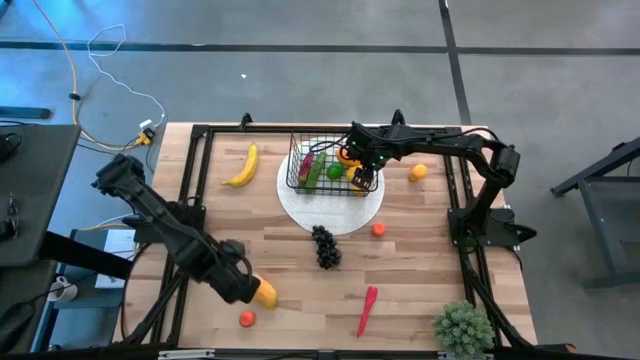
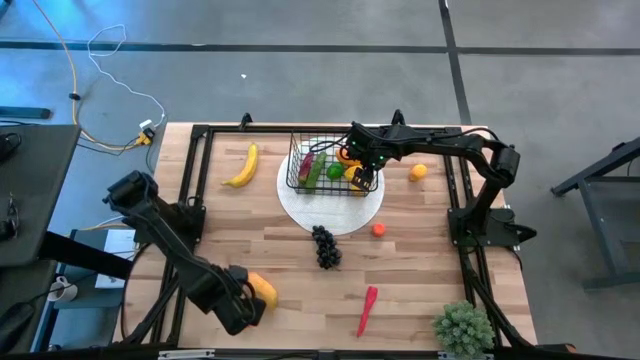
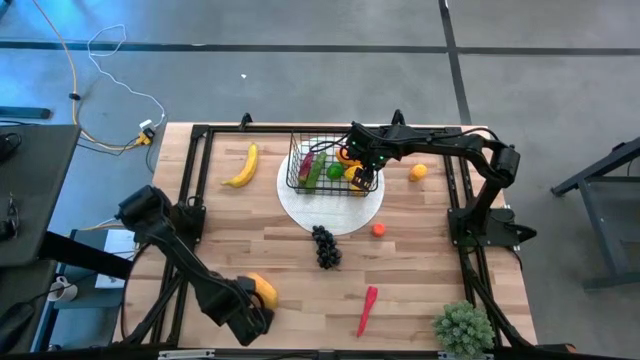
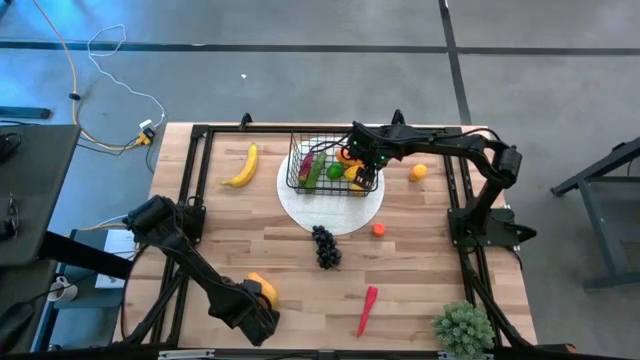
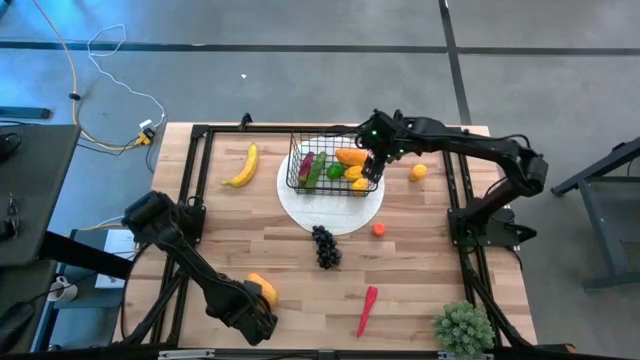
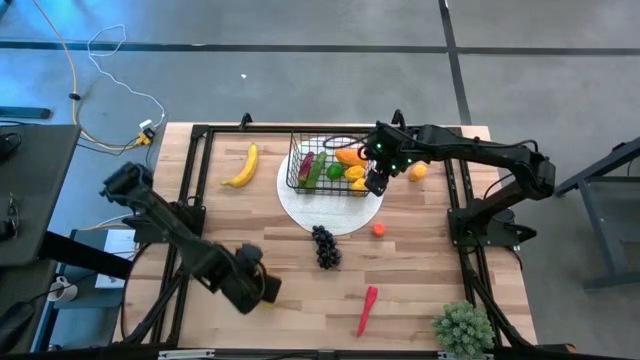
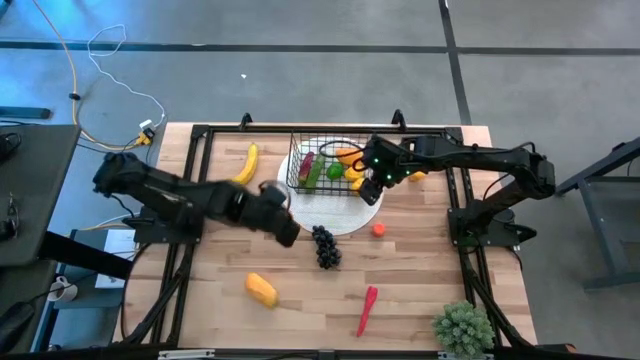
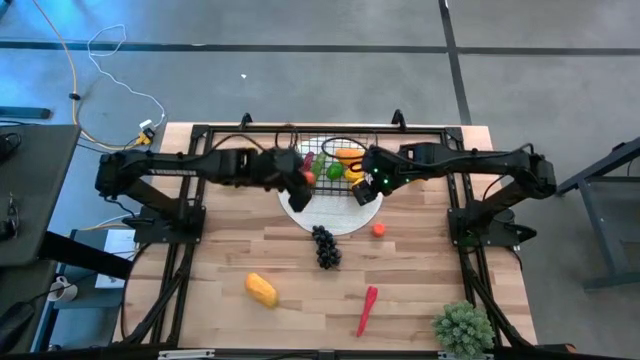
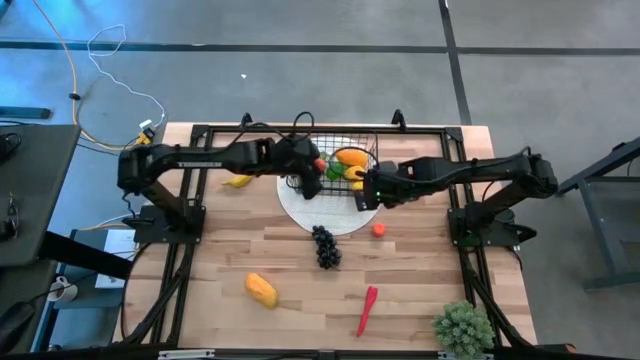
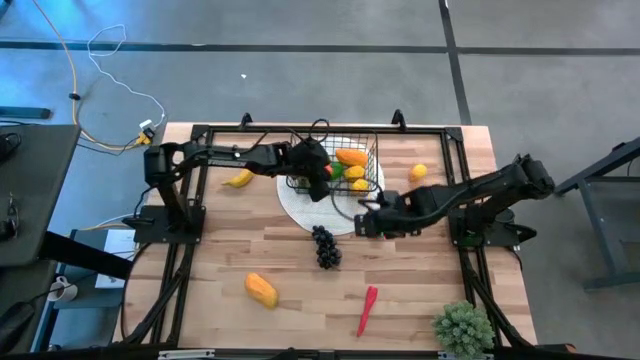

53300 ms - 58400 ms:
Task: Build produce basket
Put the bottom orange into the wire basket

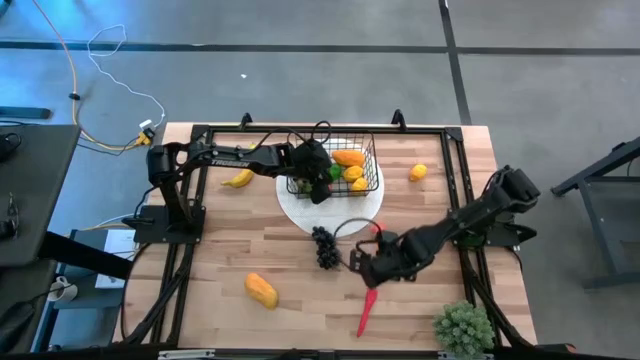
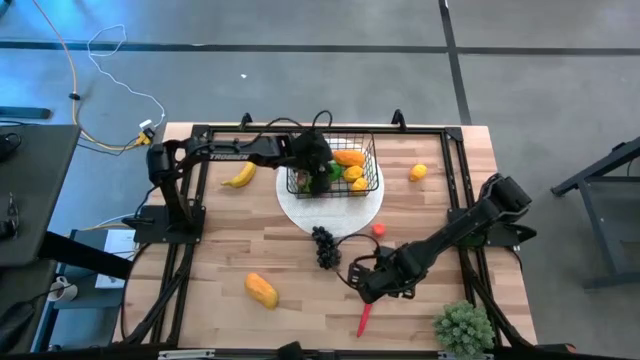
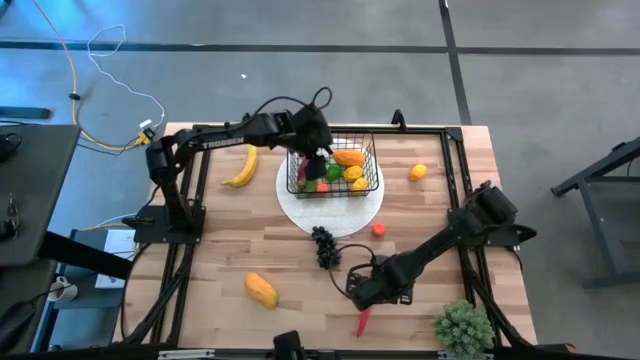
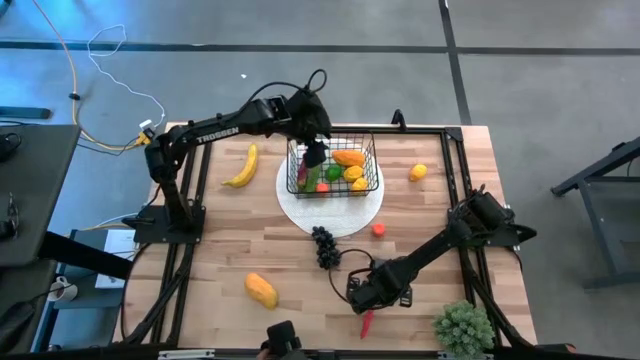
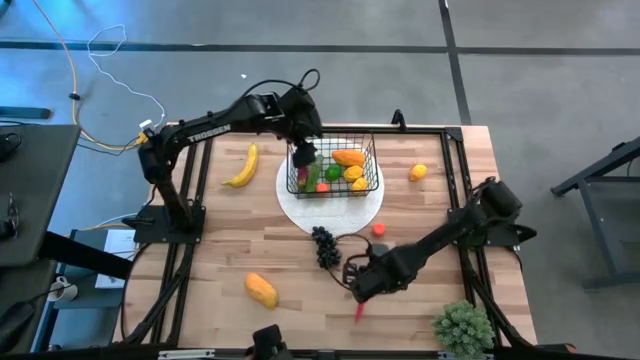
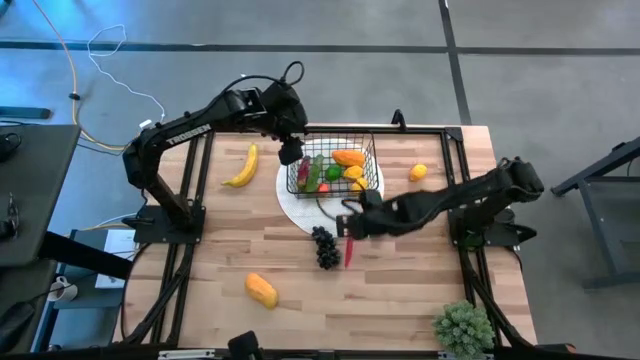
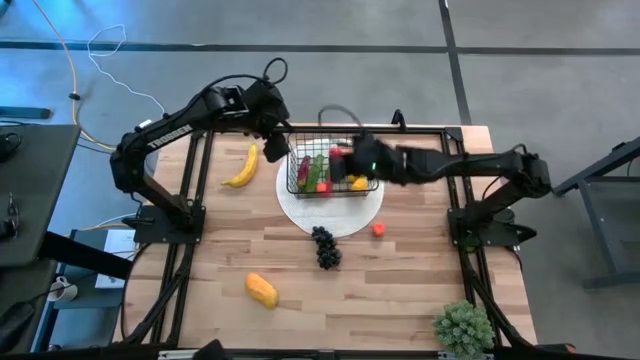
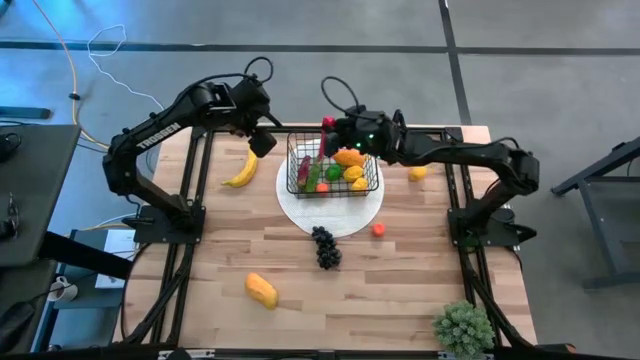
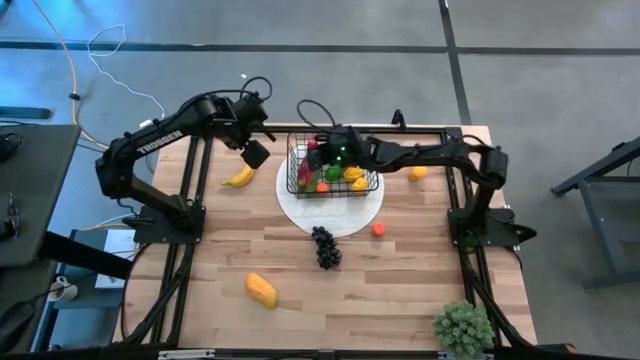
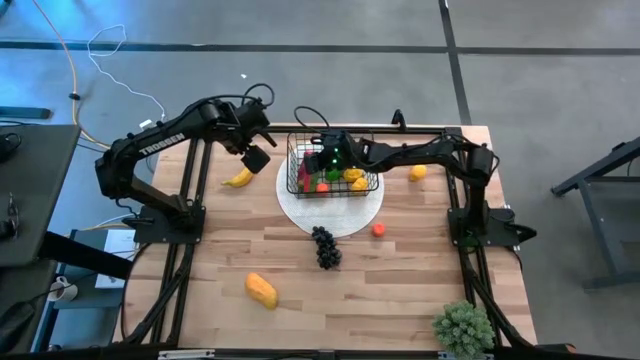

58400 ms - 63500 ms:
Put the red chili pepper into the wire basket

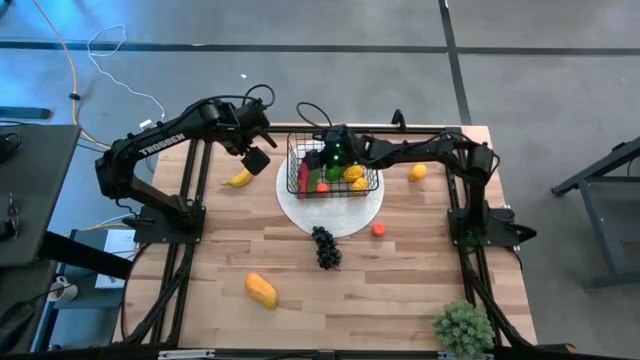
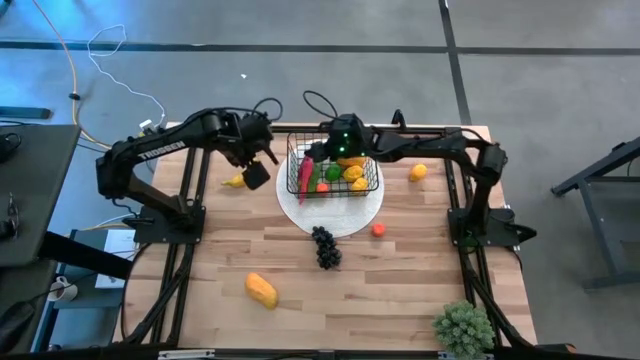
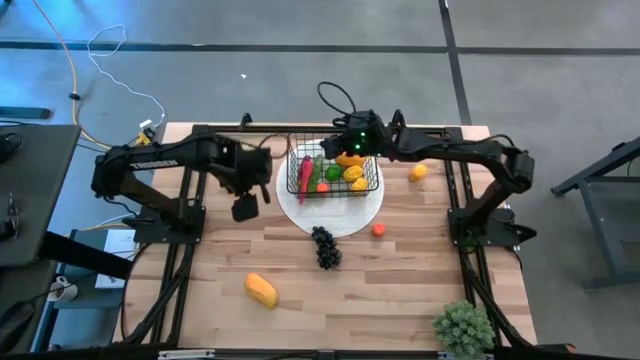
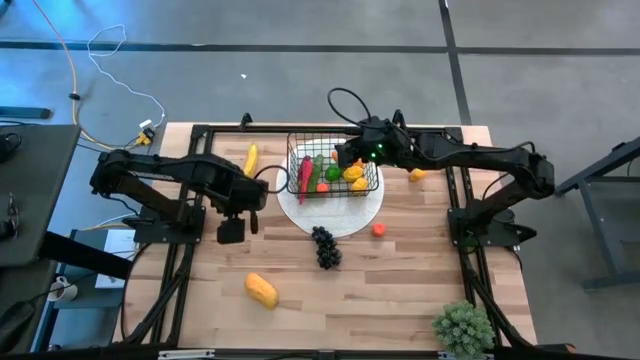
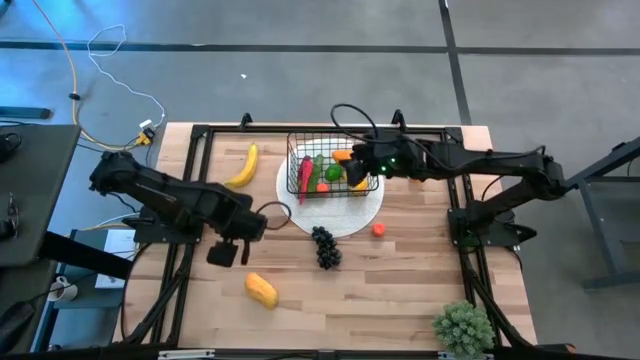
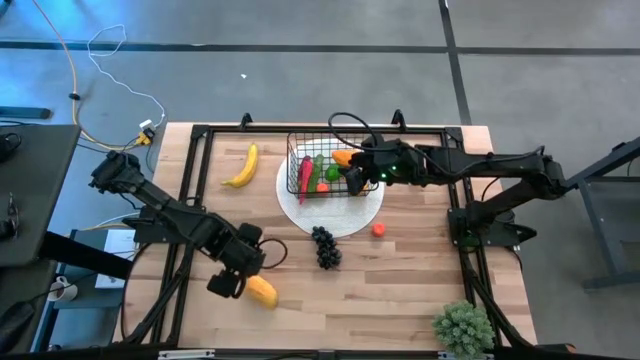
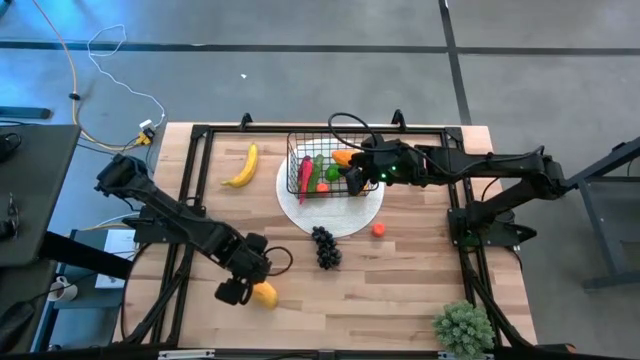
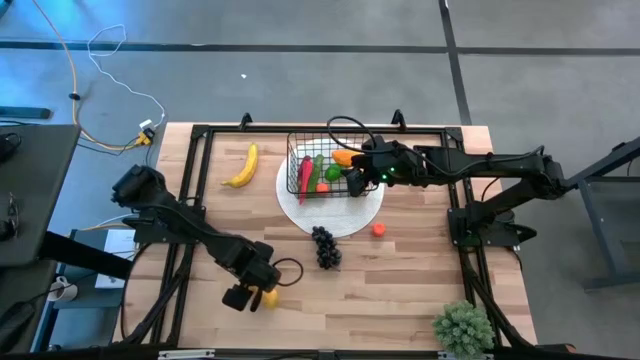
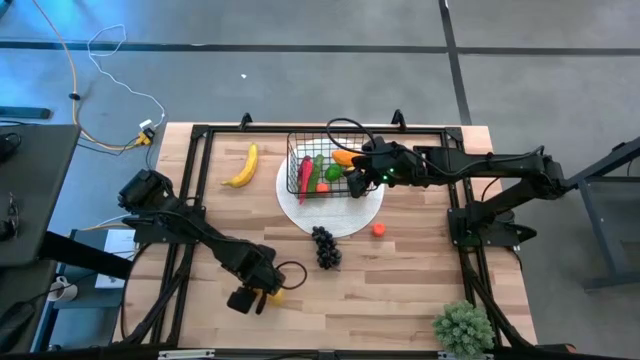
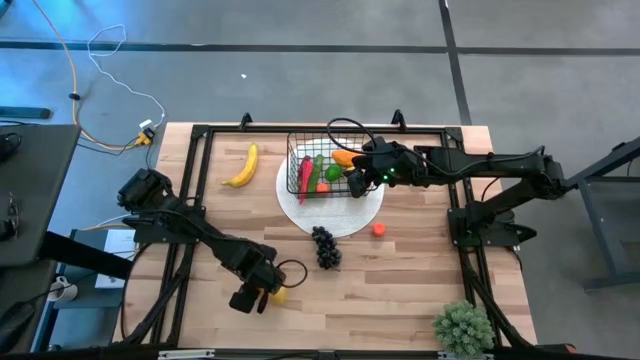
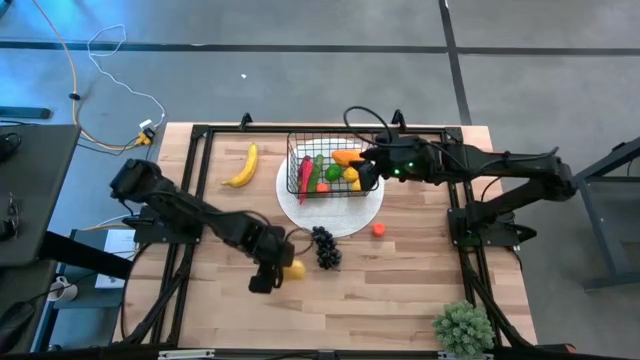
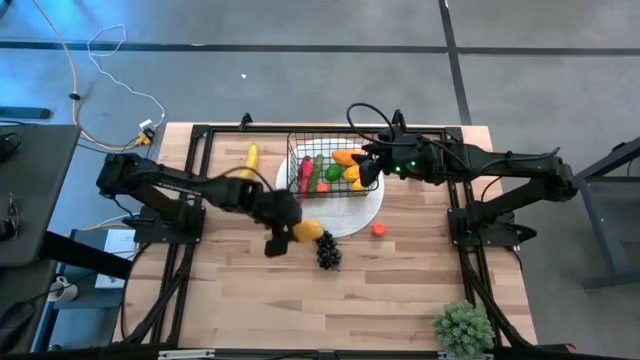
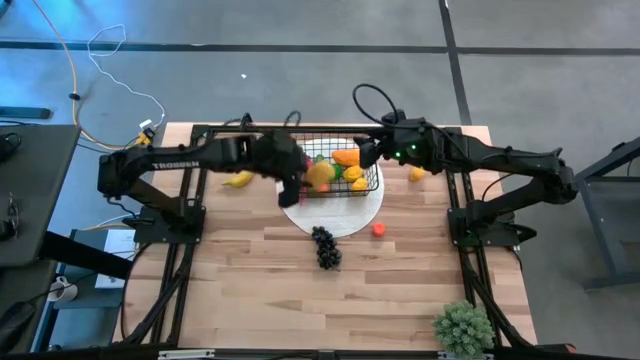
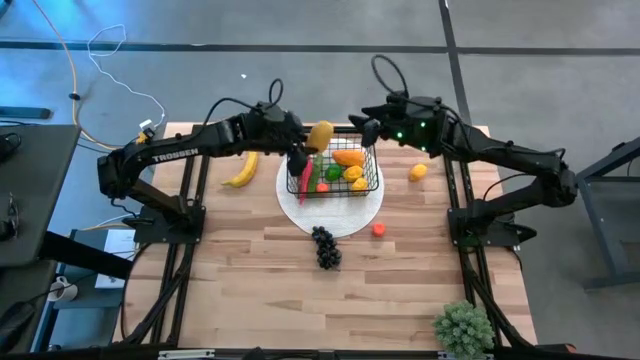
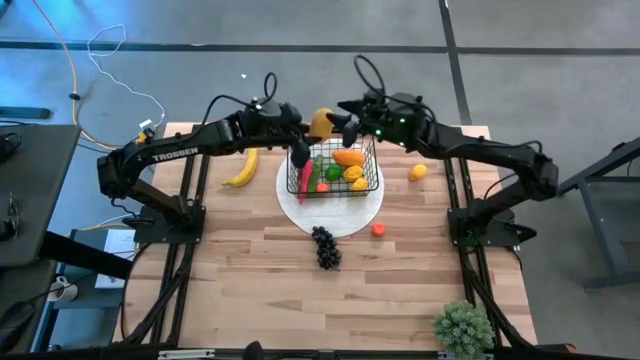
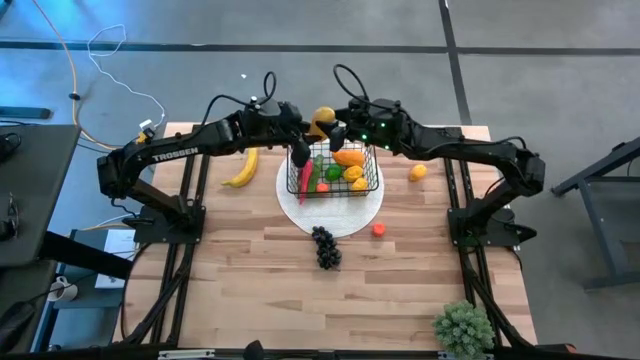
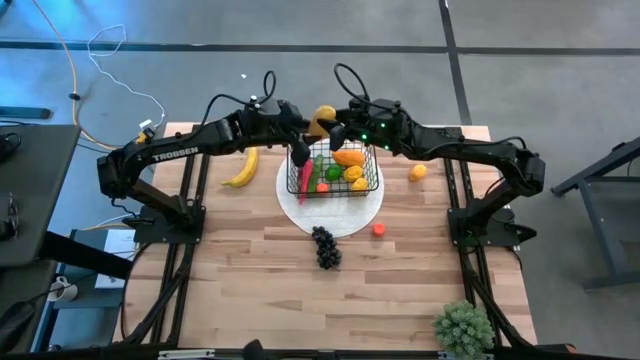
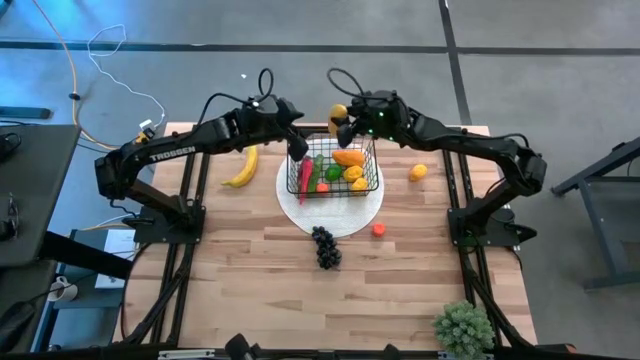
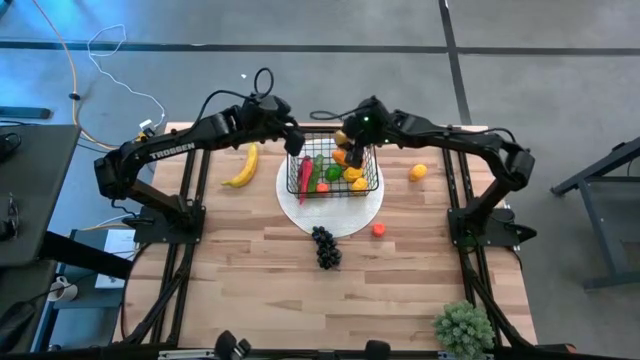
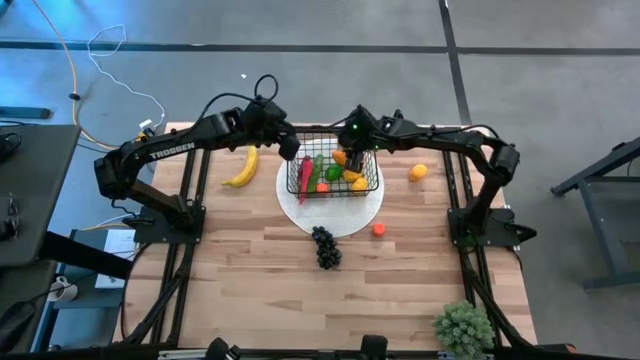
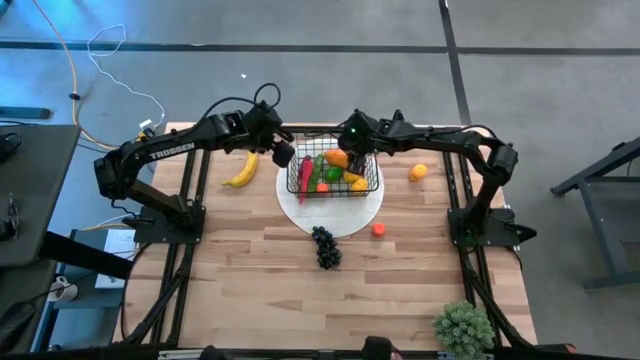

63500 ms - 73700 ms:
Put the yellow mango into the wire basket

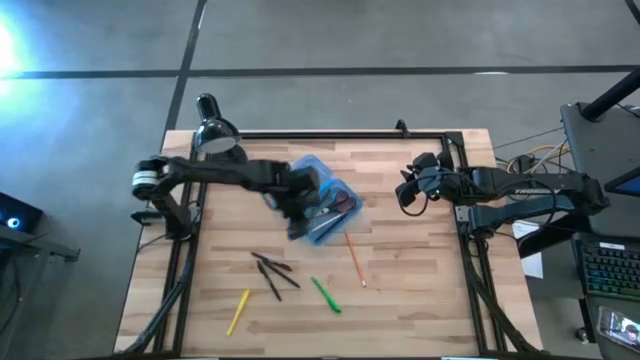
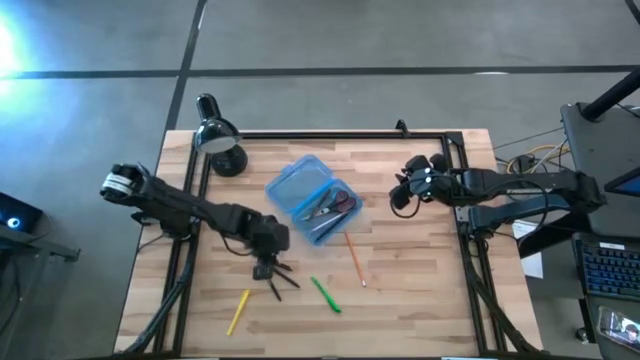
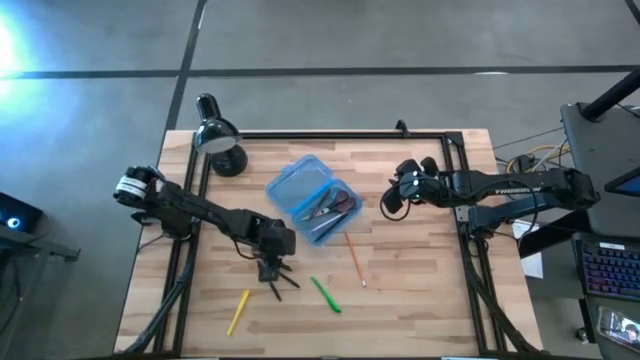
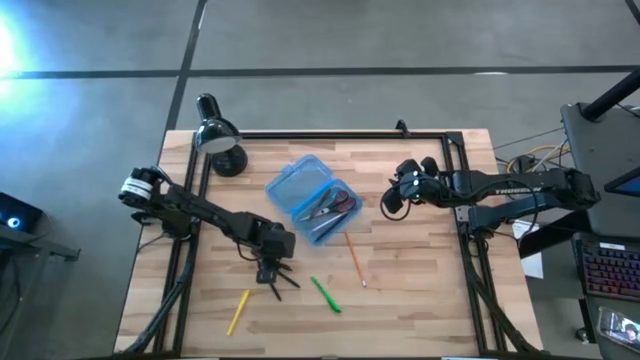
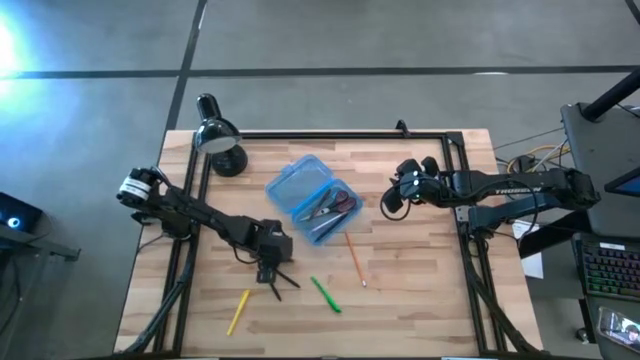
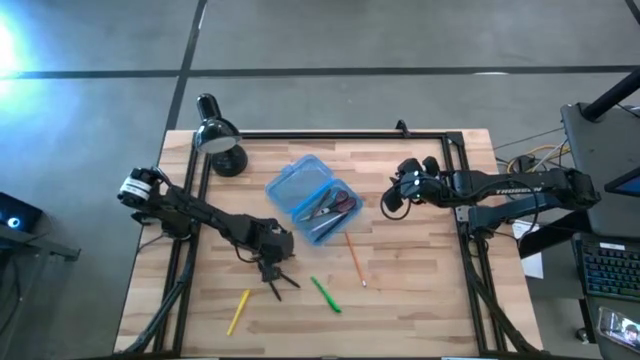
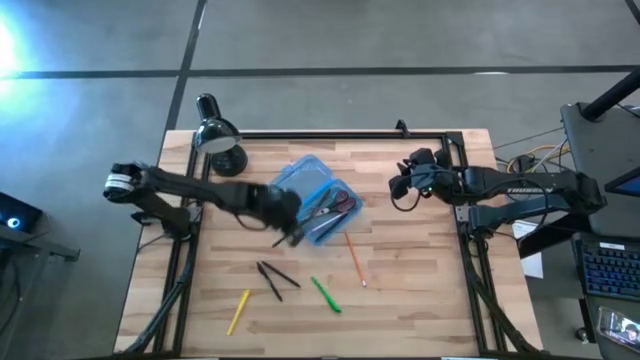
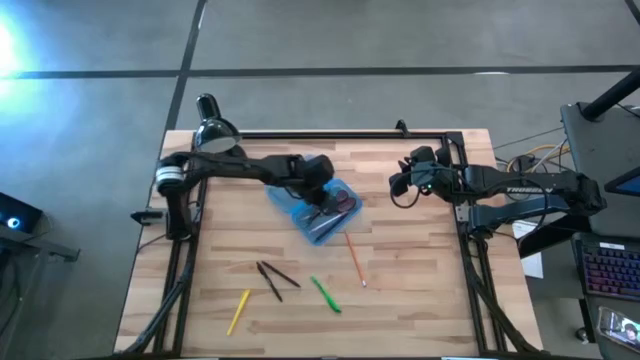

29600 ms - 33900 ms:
Task: Pick & place school supplies into a supply box
Put the top black pen into the supply box
